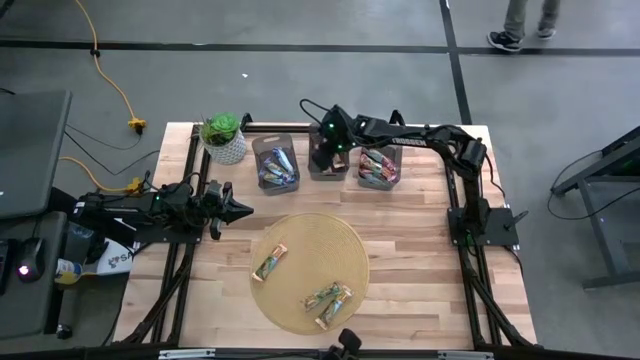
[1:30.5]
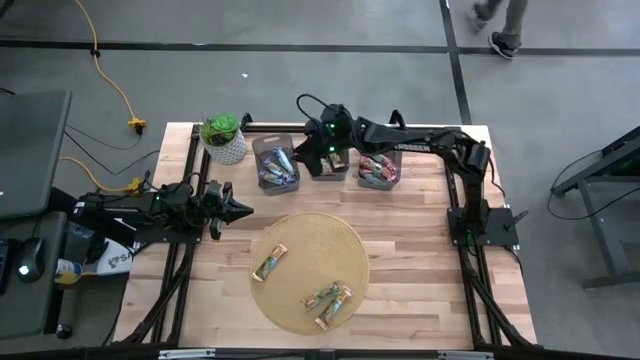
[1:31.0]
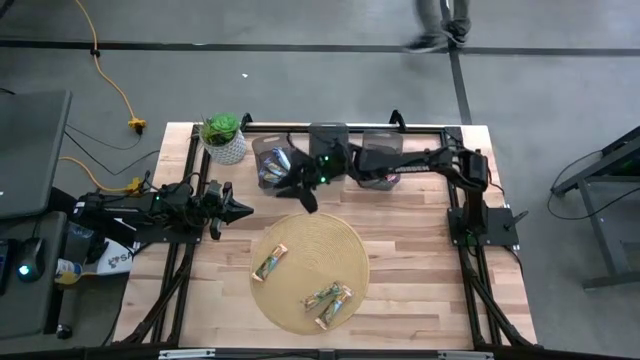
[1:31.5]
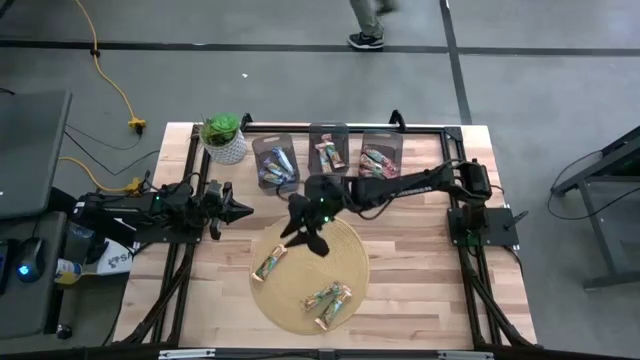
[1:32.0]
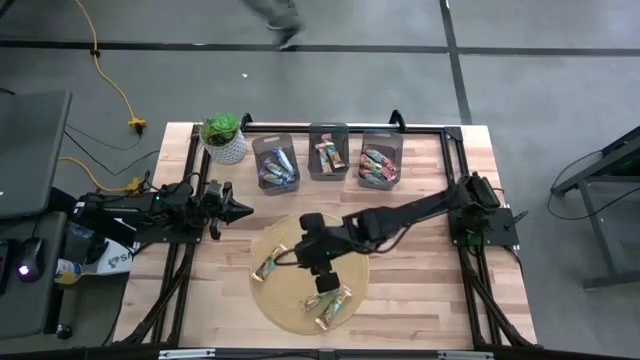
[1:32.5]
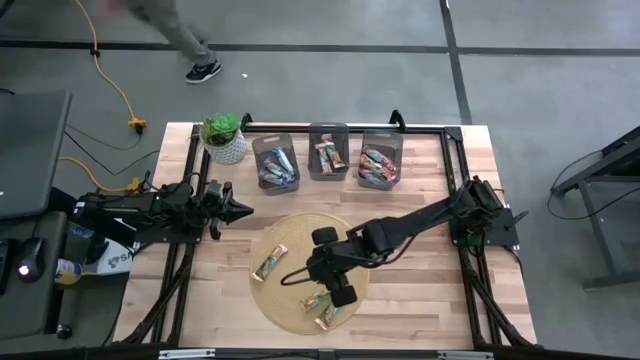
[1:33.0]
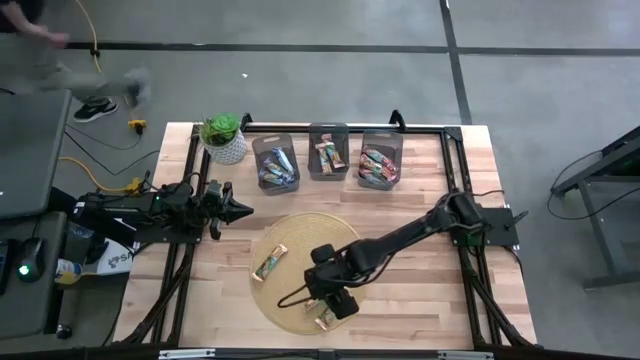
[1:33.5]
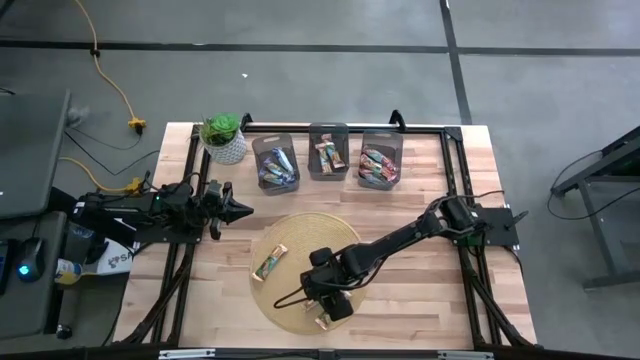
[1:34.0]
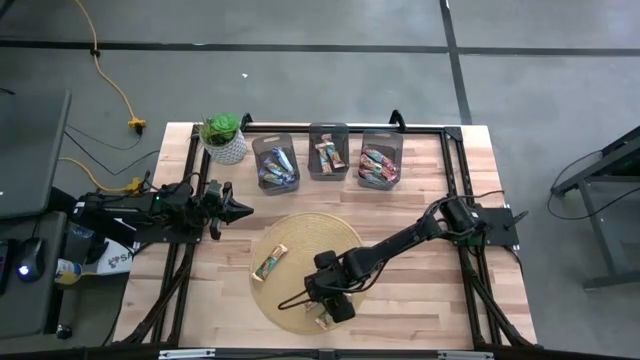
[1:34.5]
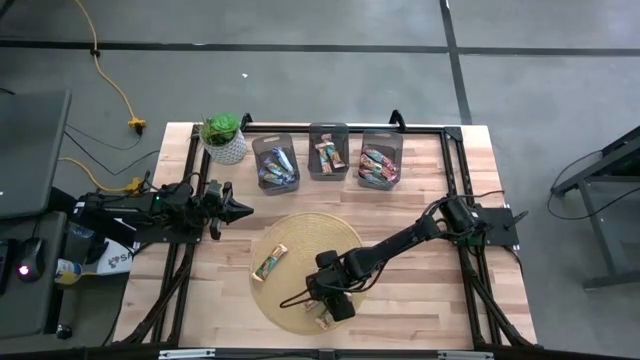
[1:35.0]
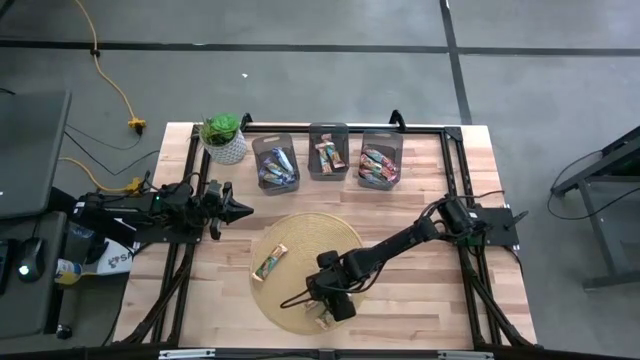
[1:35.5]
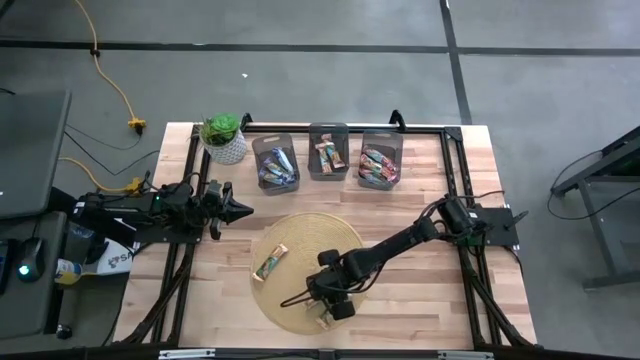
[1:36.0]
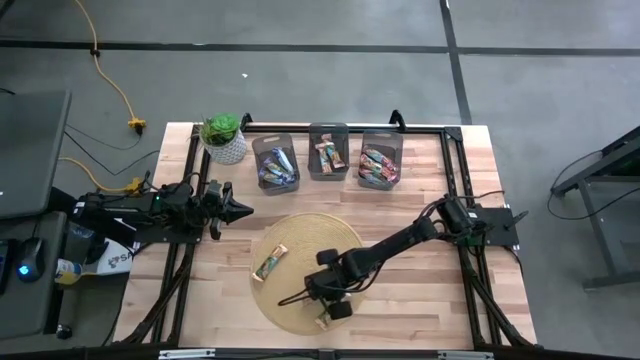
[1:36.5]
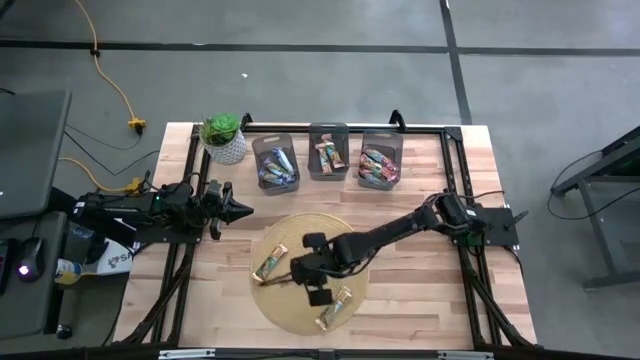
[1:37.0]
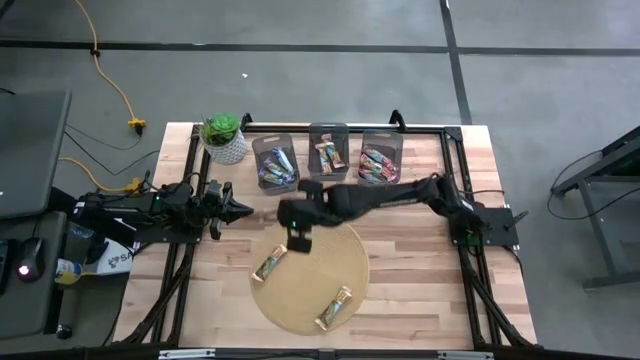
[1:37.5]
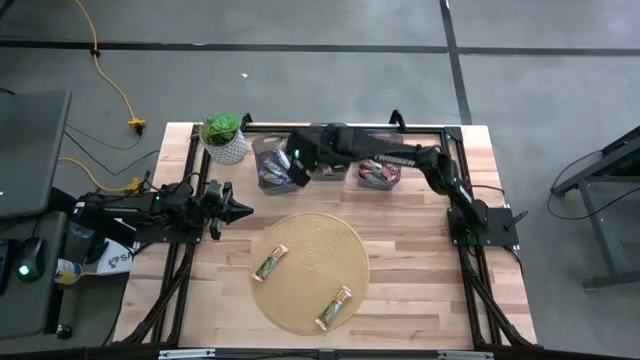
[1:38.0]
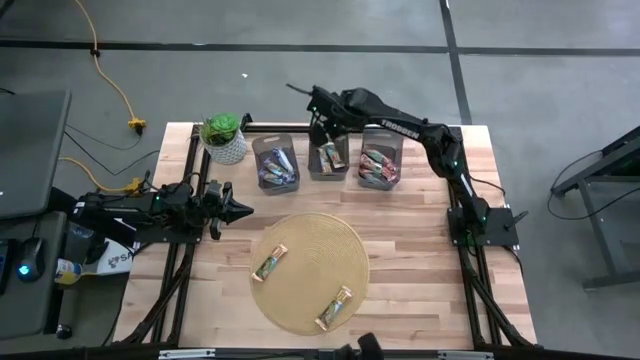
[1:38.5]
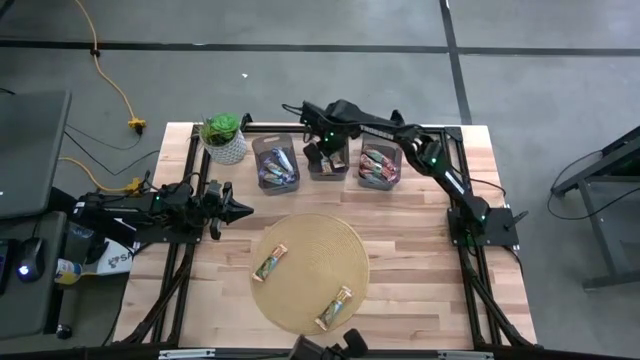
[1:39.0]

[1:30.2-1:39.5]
Task: Pick and place Granola Bars by type
Put the yellow granola bar into the center black bin

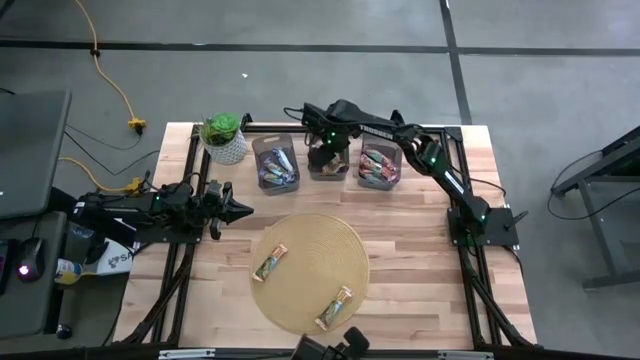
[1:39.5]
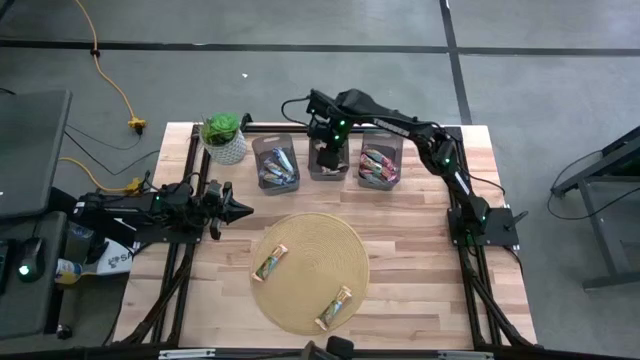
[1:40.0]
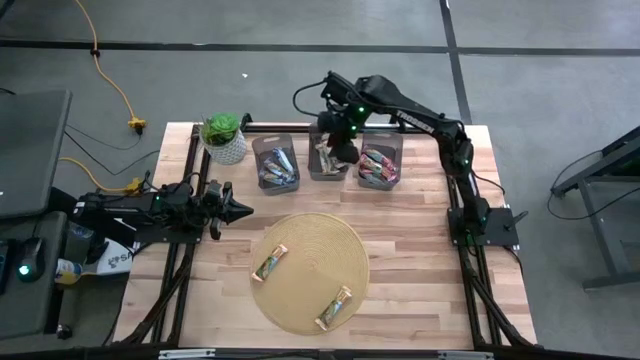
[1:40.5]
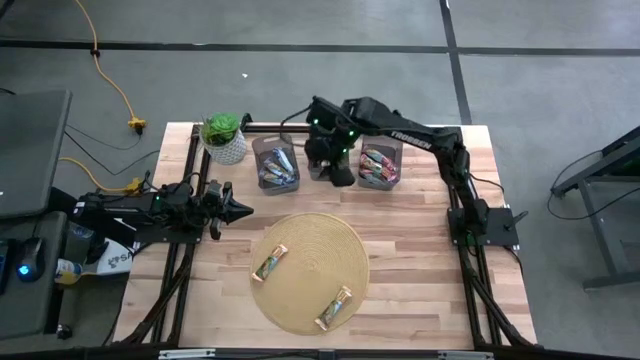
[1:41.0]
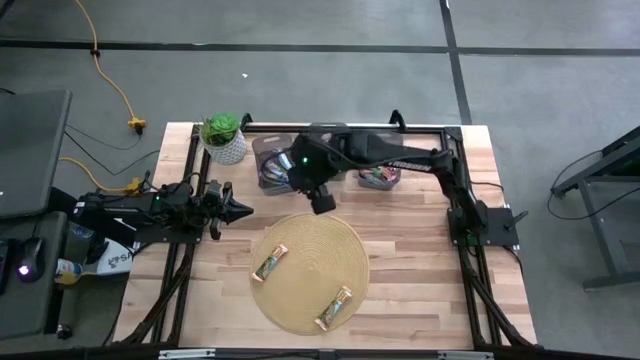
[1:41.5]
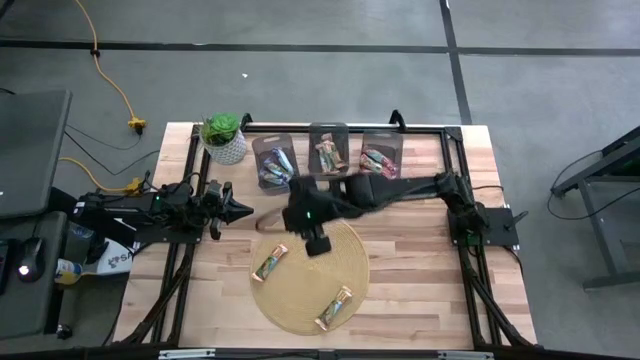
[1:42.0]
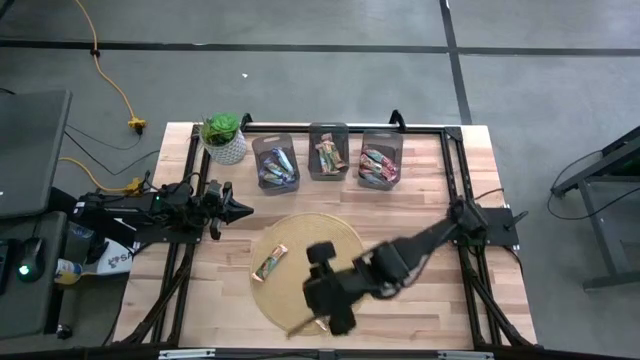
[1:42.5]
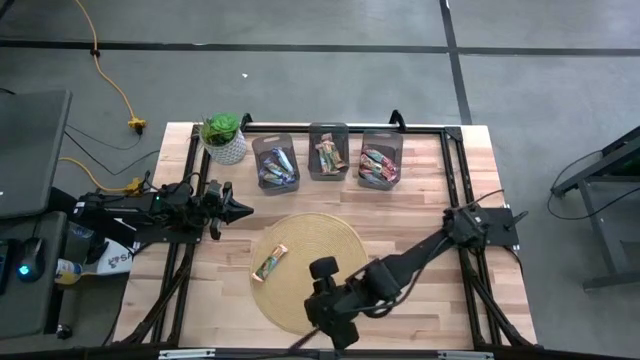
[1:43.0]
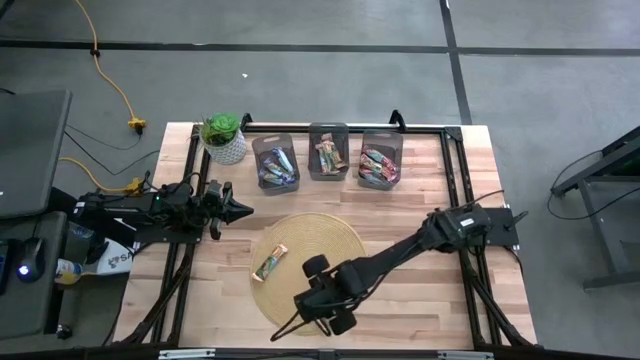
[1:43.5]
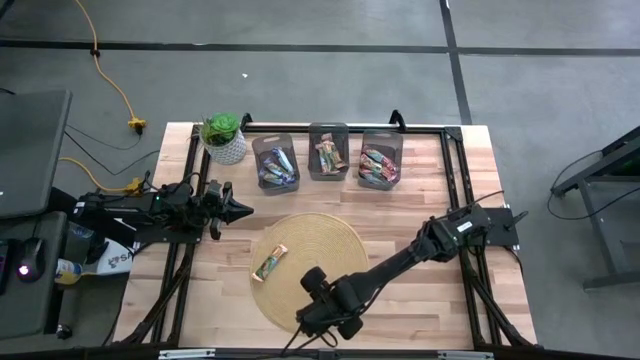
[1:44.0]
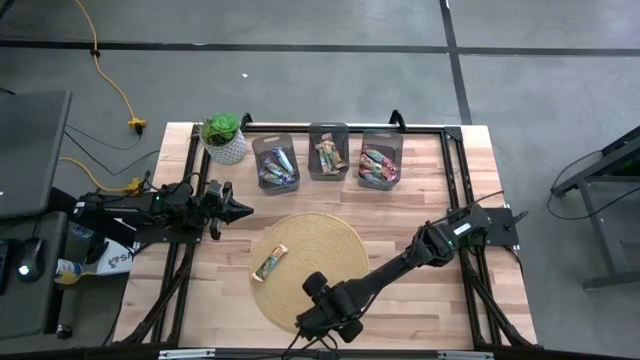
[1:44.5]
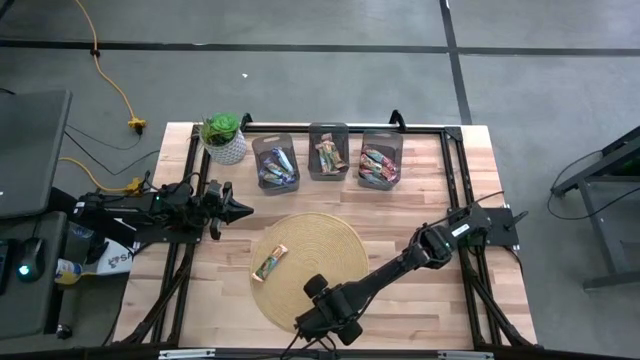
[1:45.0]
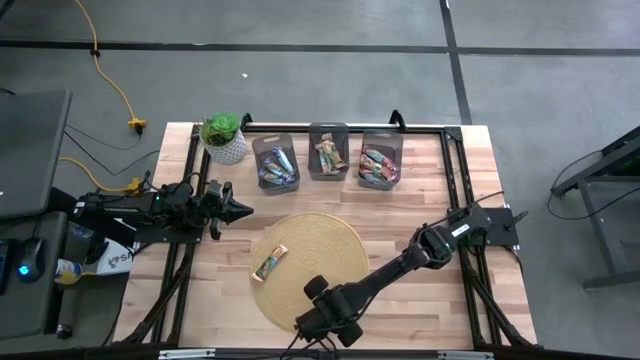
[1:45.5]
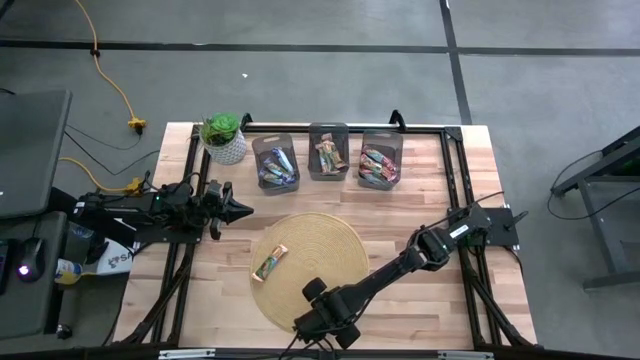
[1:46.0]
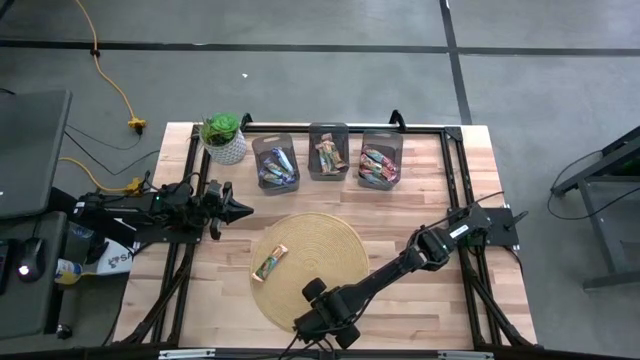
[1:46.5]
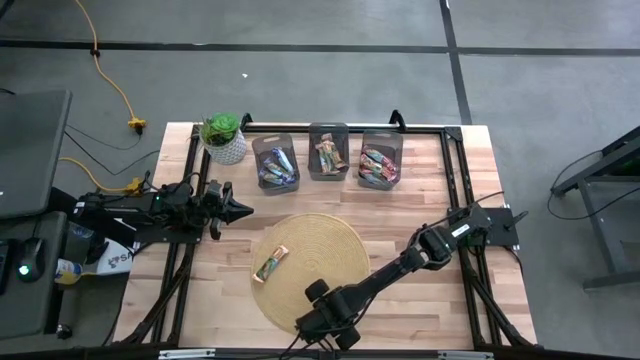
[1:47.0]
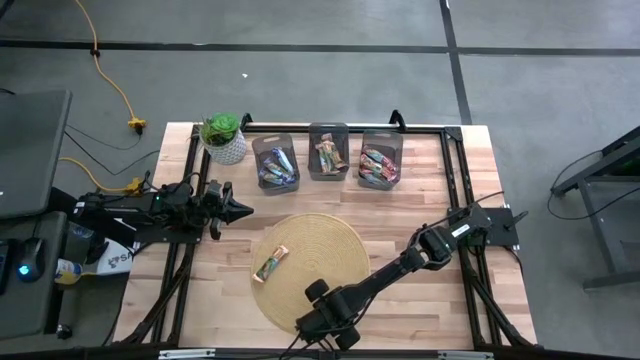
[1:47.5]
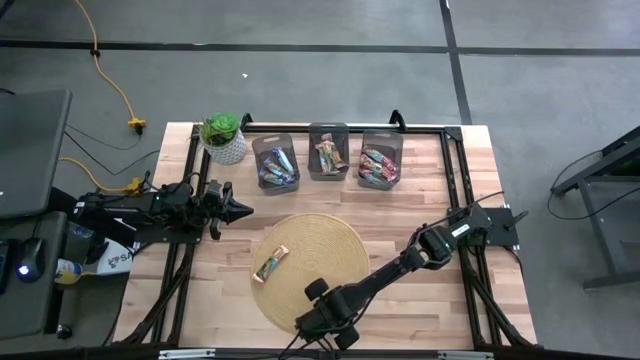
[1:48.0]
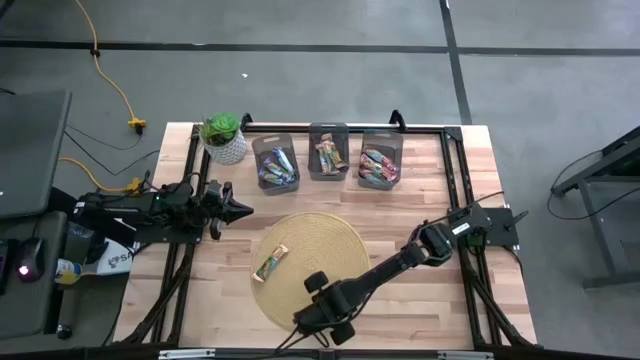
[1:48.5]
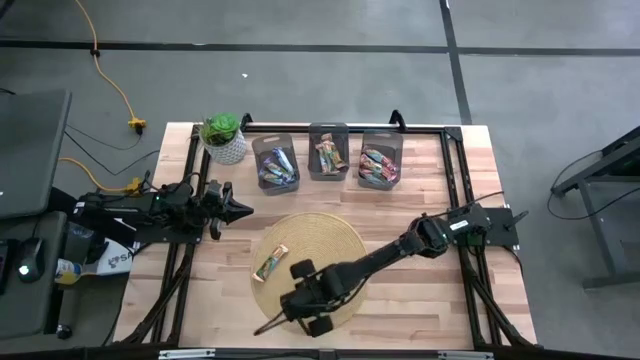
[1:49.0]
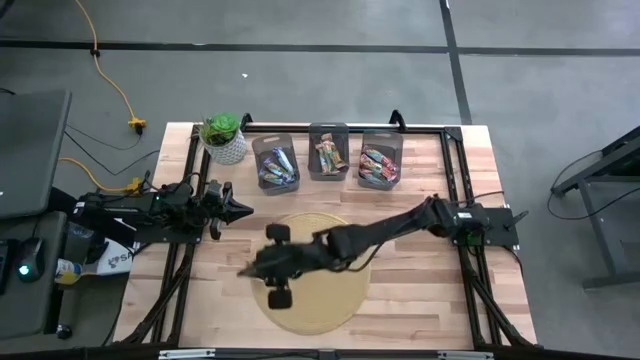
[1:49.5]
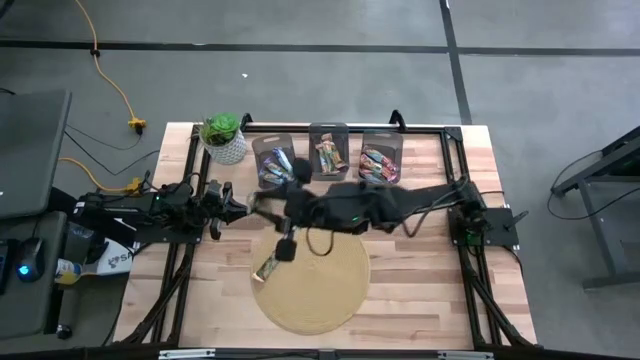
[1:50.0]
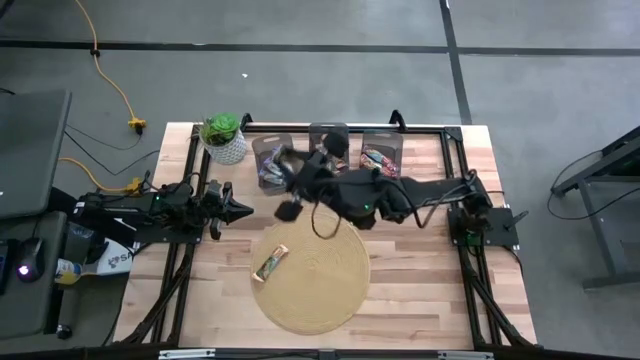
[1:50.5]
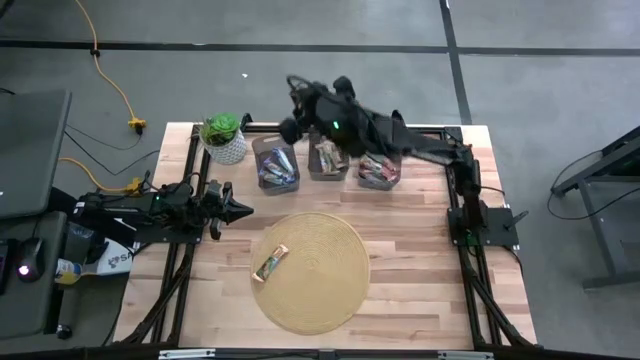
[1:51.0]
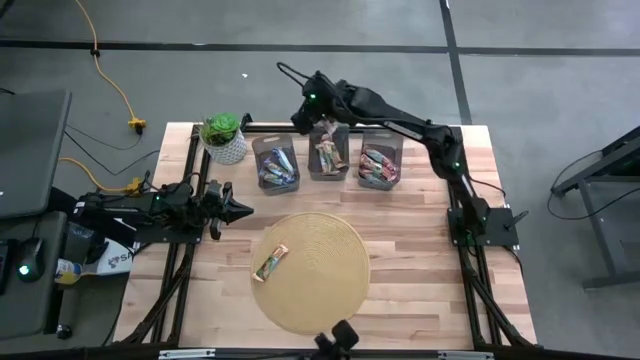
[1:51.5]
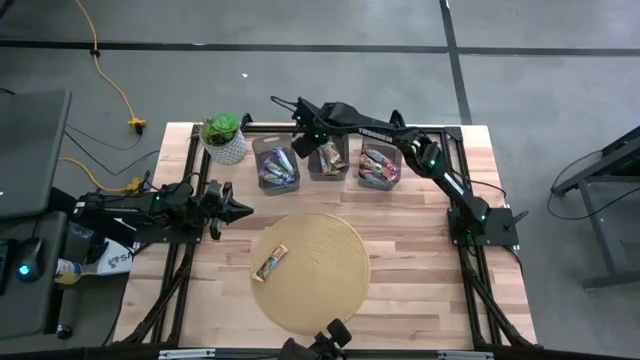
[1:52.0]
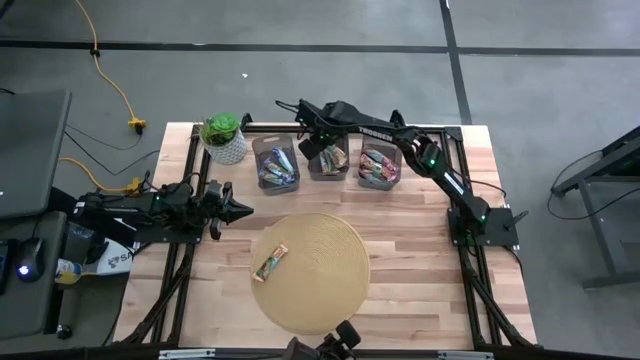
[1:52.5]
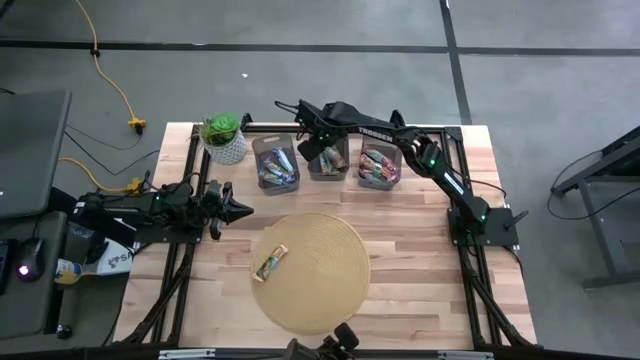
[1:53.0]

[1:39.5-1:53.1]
Put the yellow granola bar into the center black bin
